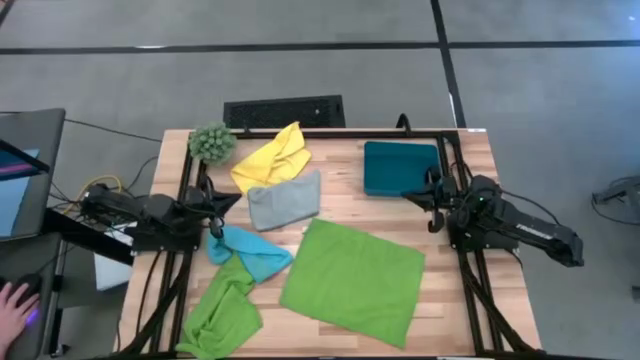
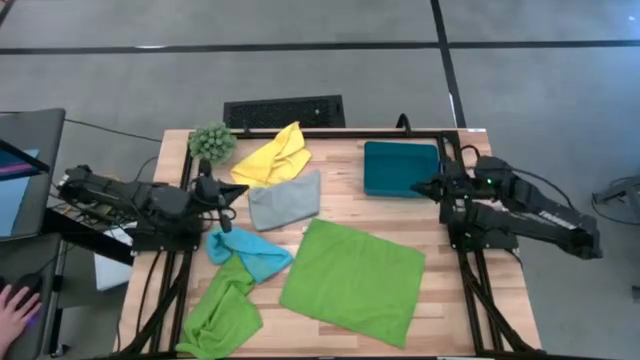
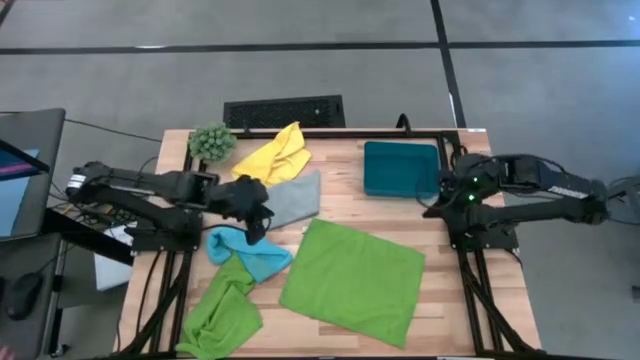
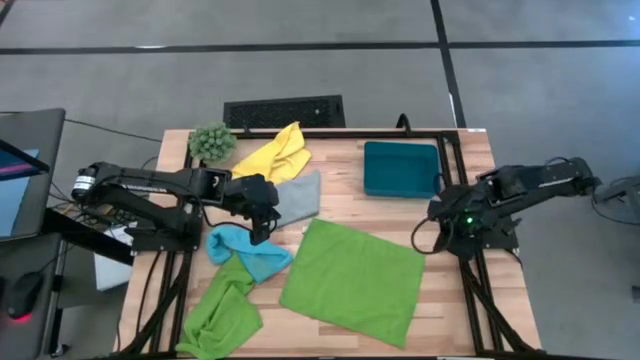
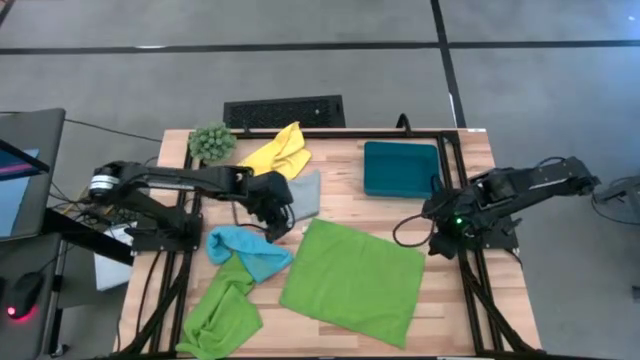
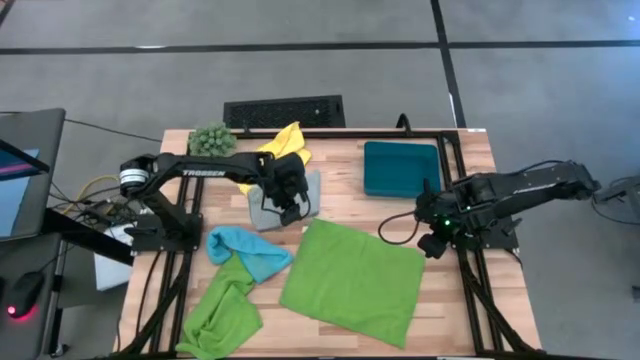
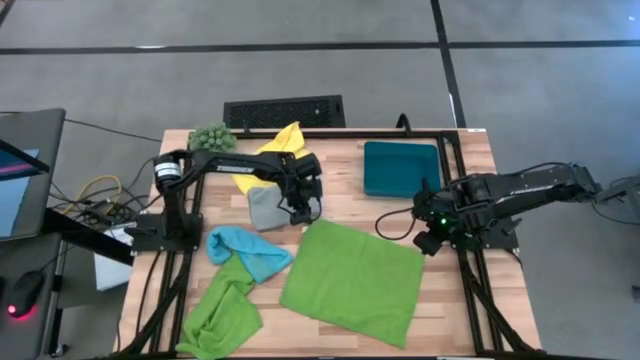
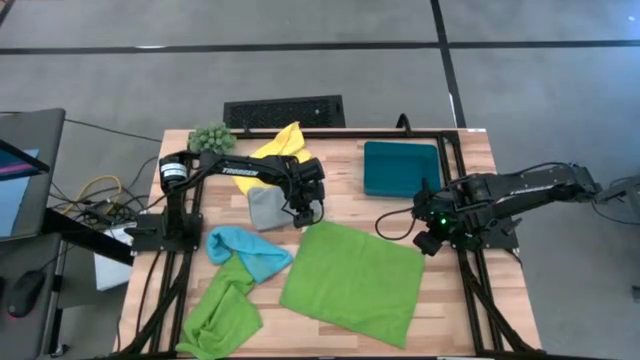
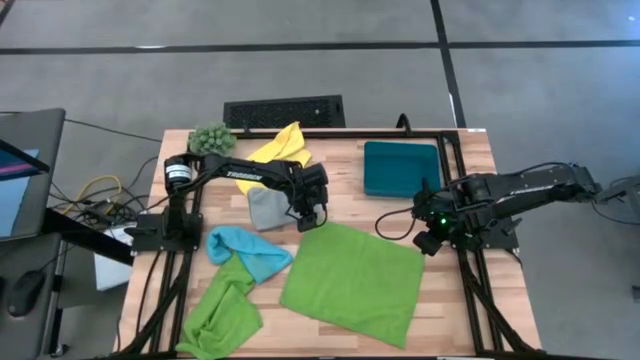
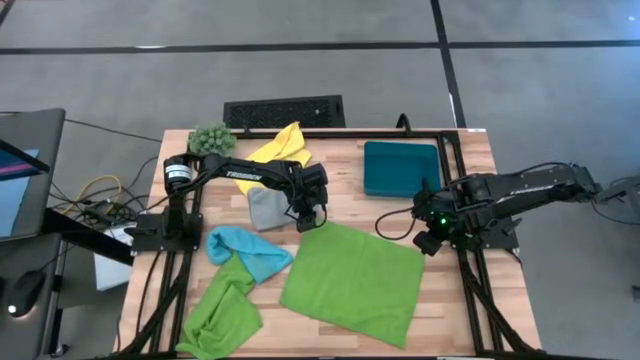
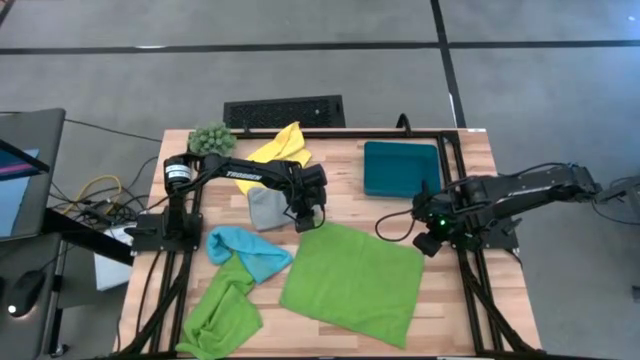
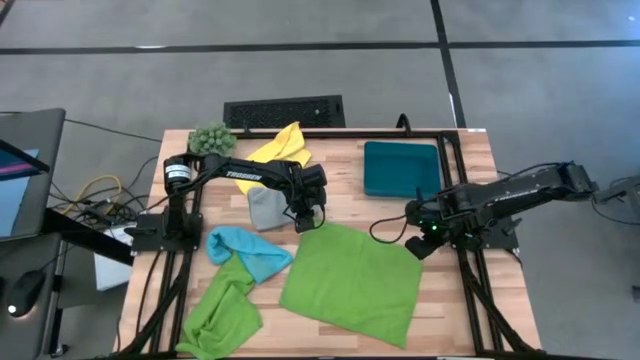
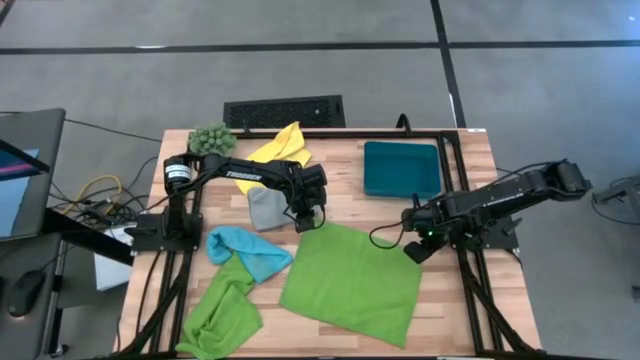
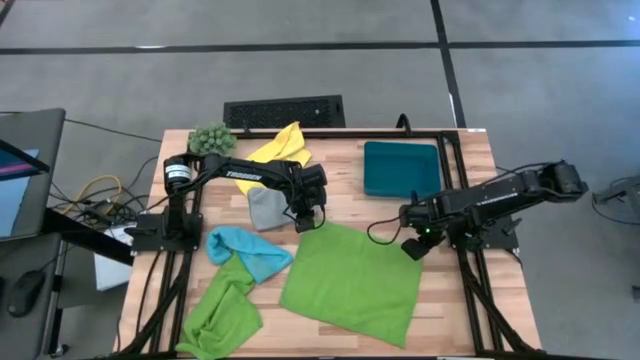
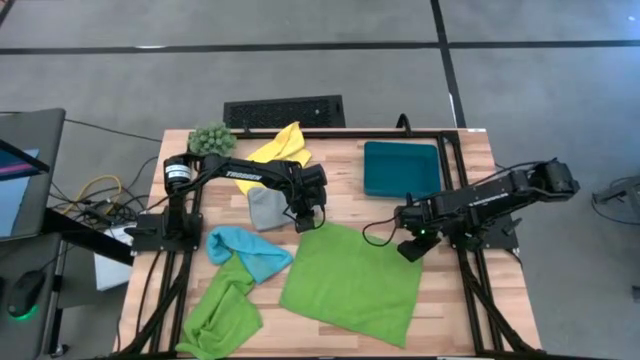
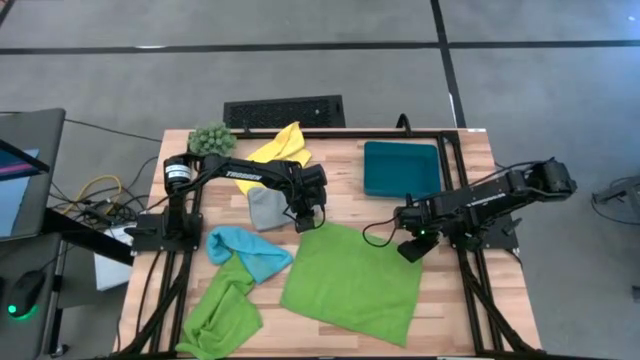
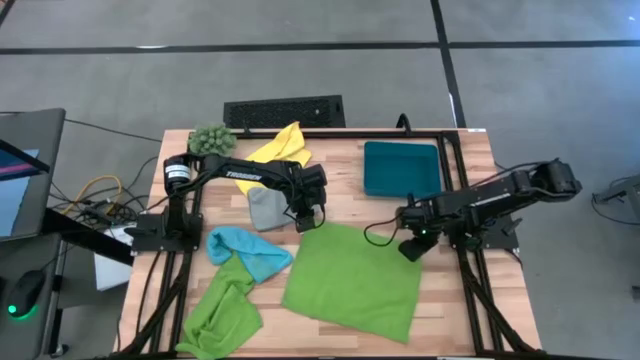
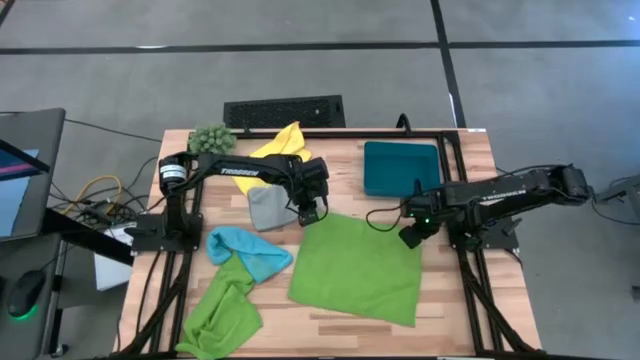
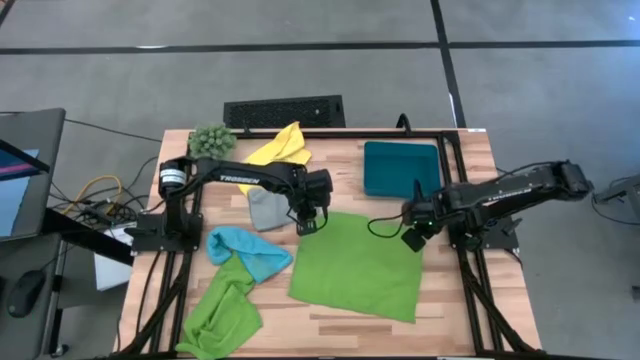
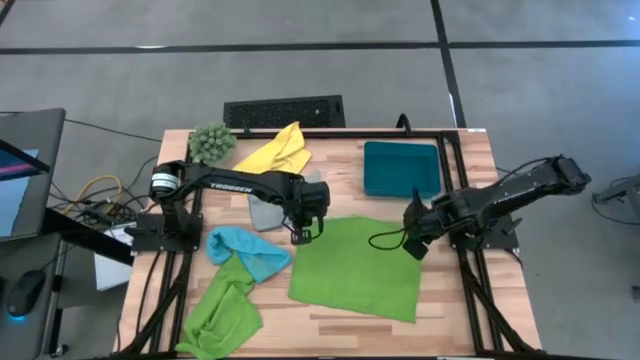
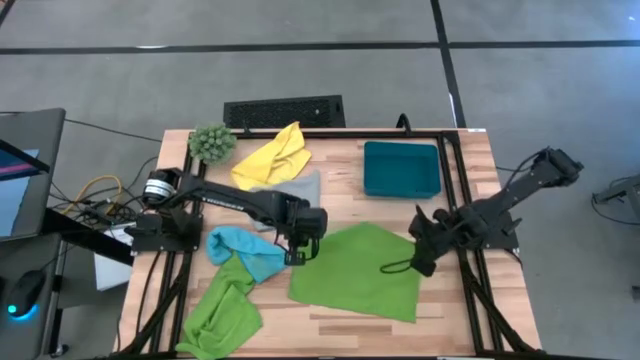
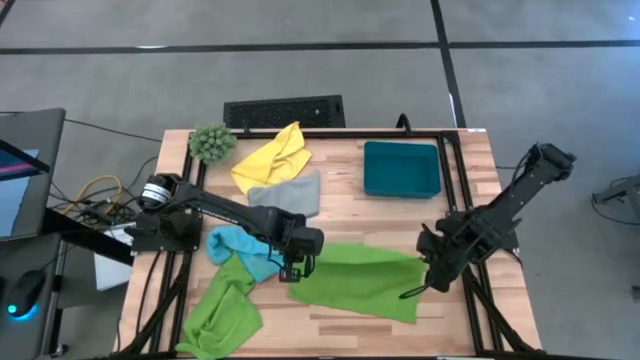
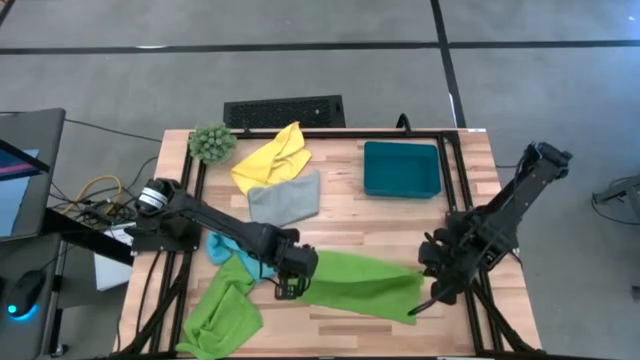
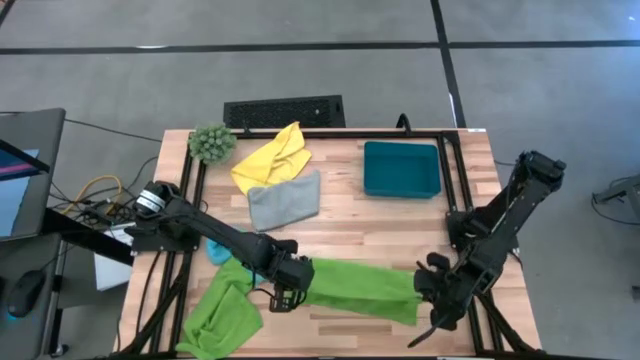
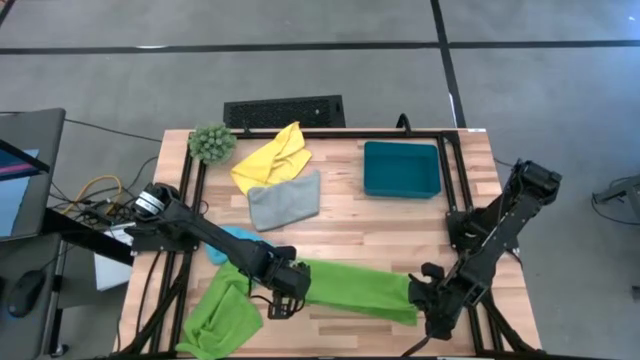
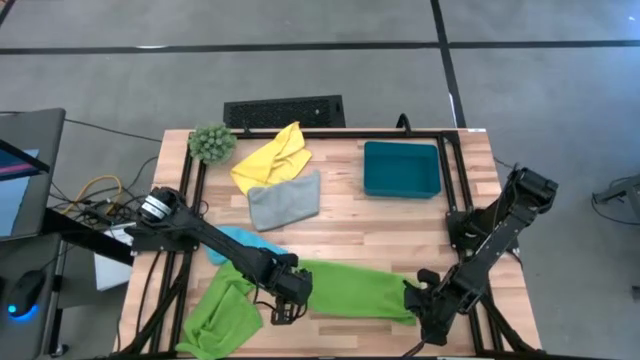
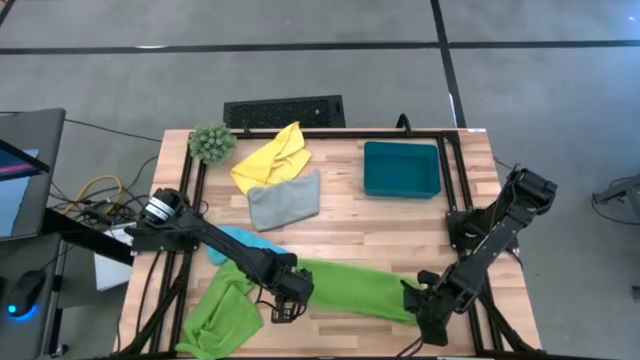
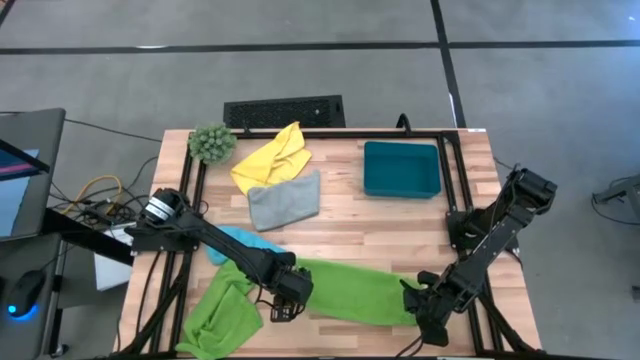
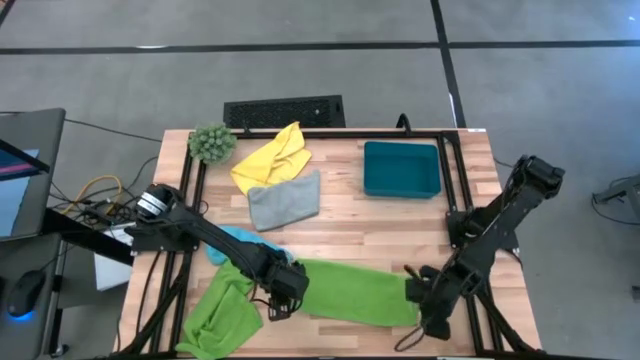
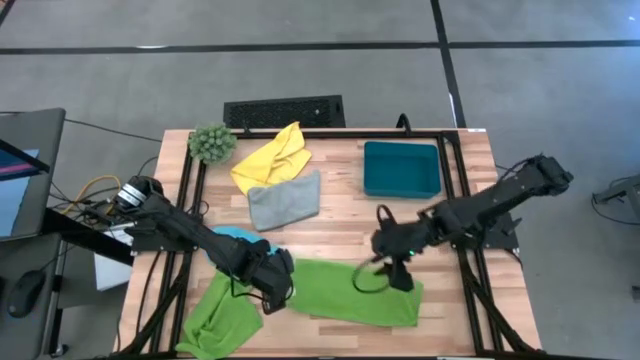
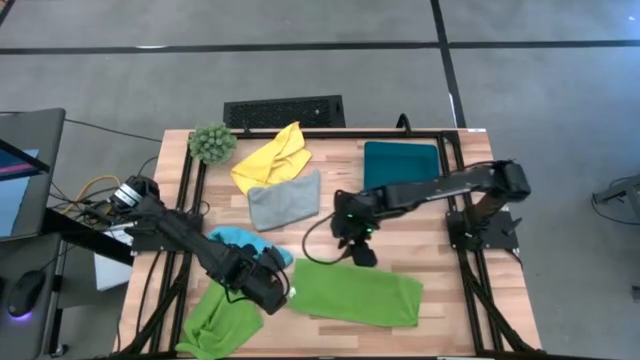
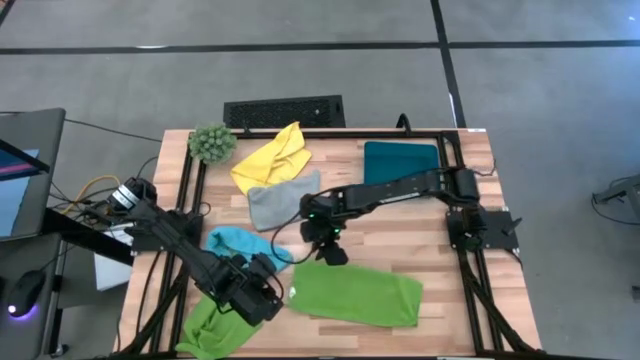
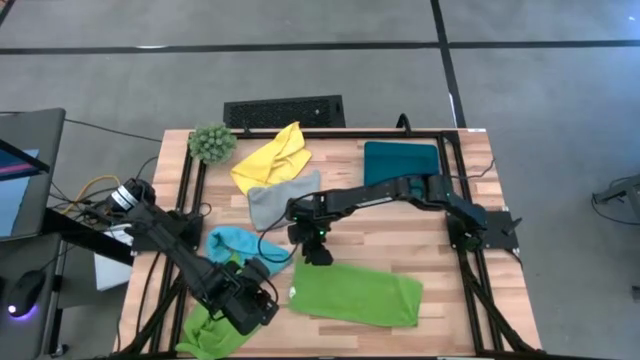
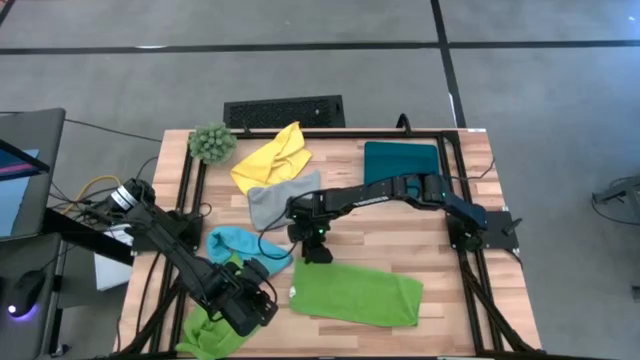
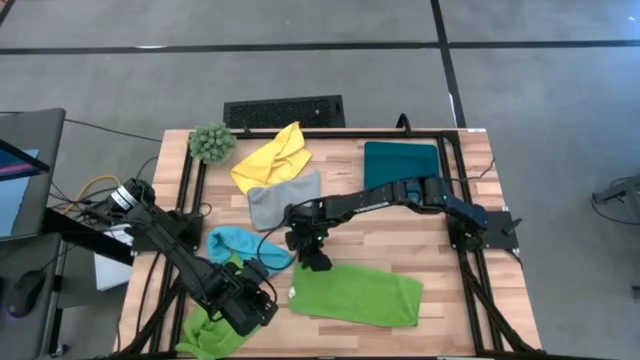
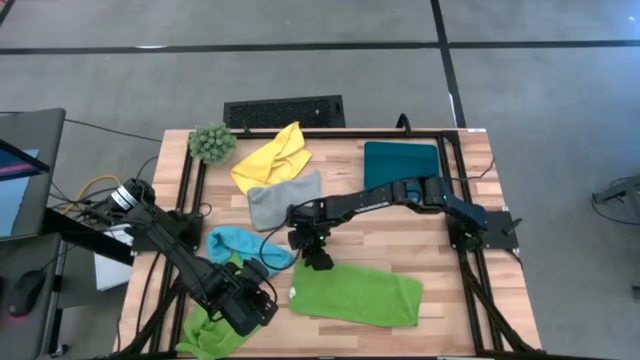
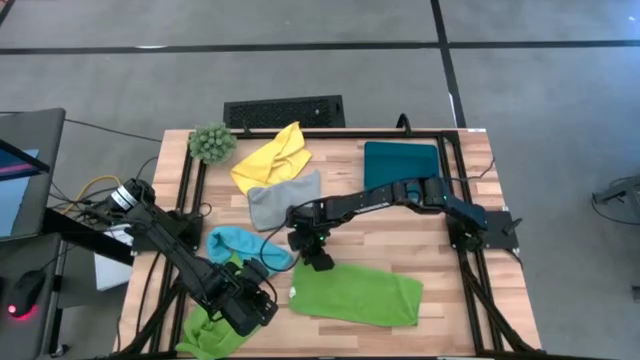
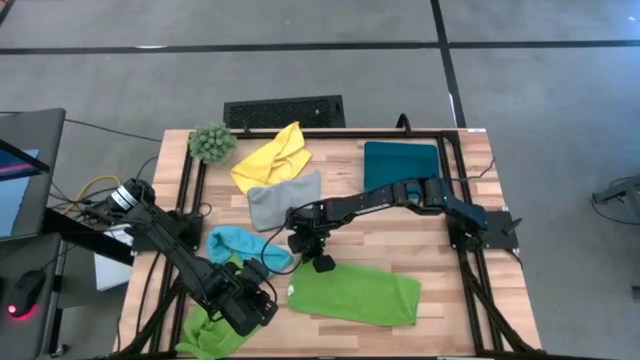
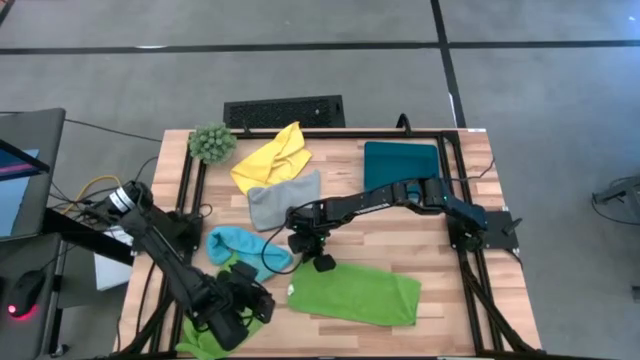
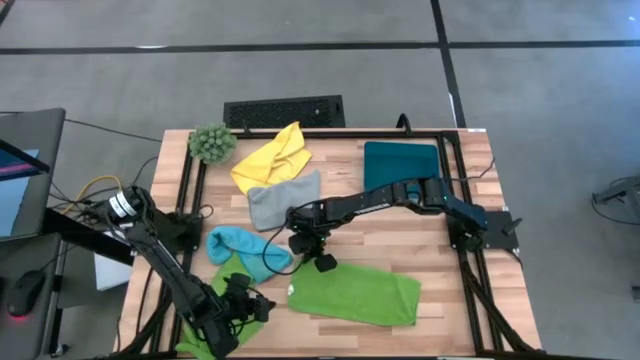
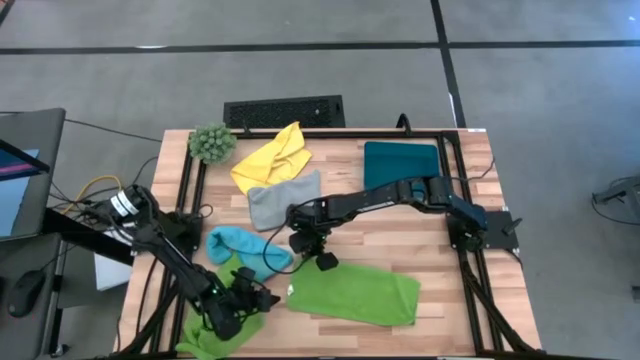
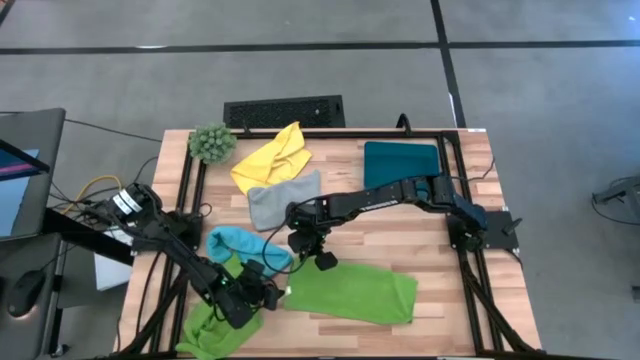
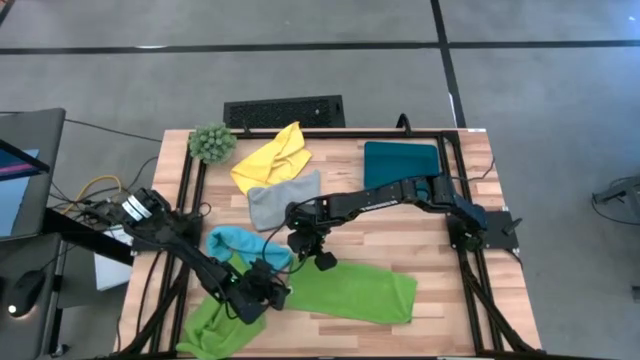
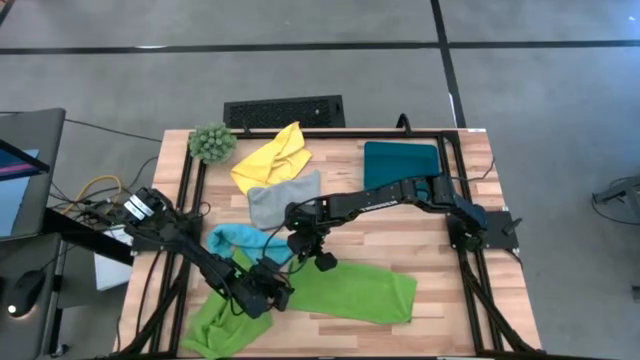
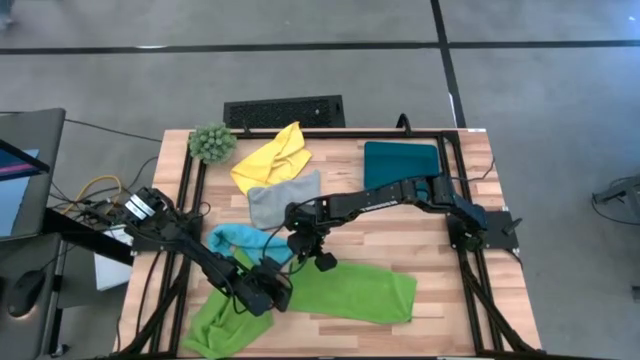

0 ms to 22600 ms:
Task: Fold microfiber towels
Fold the right green microfiber cloth
